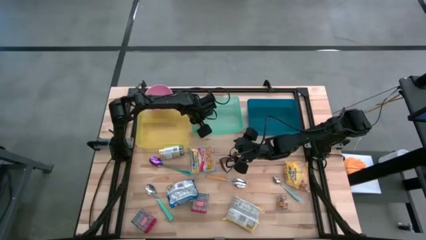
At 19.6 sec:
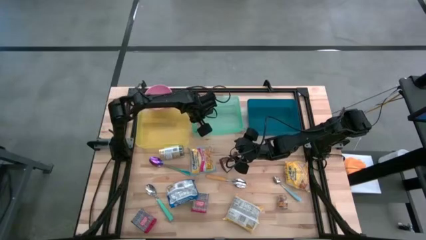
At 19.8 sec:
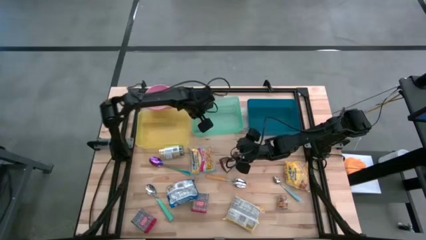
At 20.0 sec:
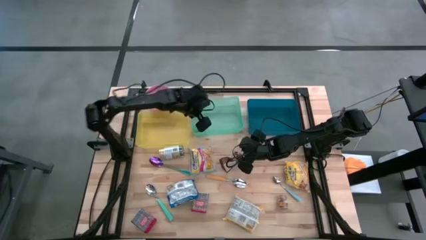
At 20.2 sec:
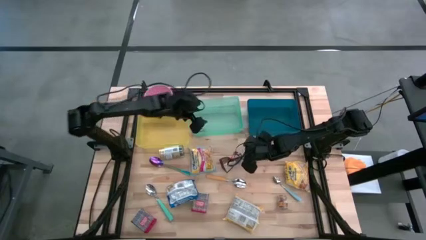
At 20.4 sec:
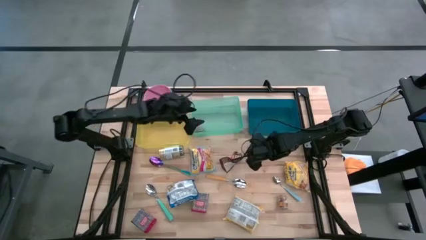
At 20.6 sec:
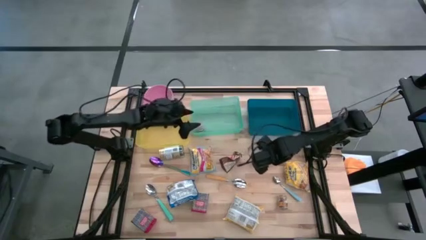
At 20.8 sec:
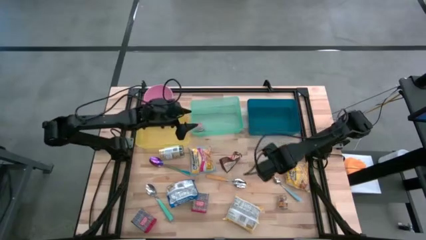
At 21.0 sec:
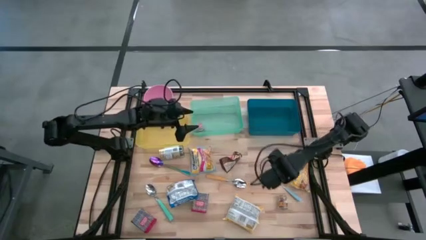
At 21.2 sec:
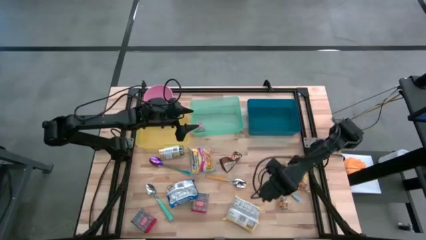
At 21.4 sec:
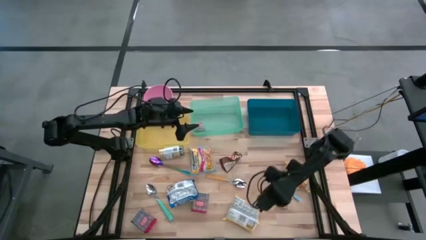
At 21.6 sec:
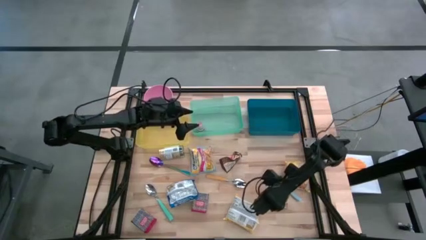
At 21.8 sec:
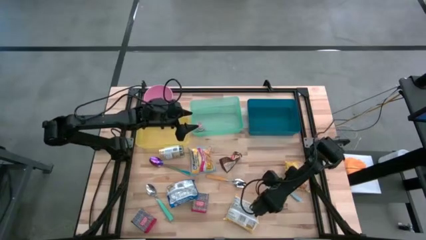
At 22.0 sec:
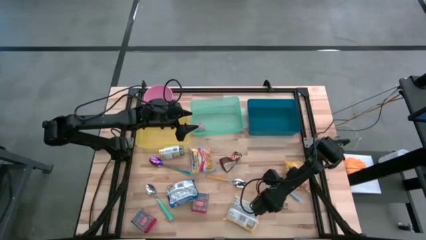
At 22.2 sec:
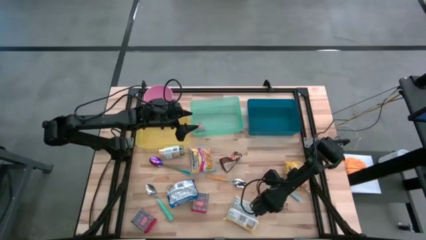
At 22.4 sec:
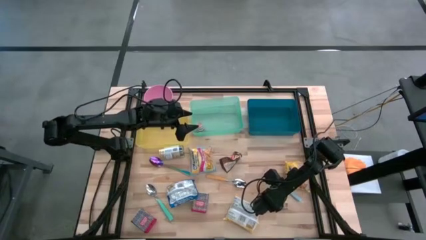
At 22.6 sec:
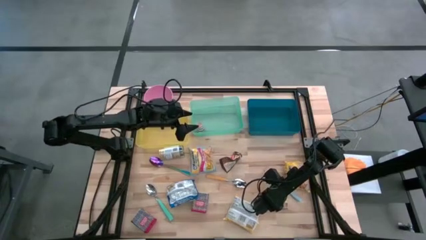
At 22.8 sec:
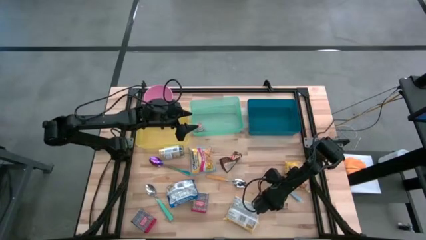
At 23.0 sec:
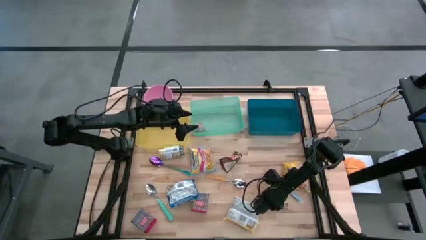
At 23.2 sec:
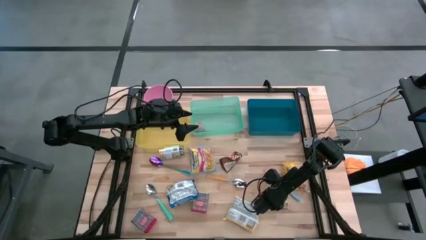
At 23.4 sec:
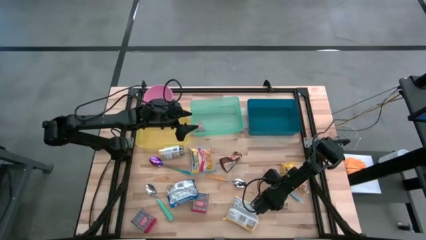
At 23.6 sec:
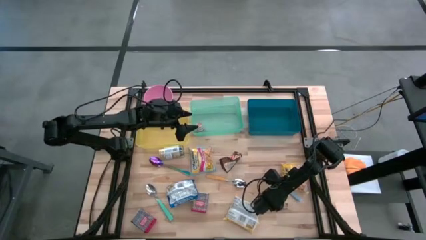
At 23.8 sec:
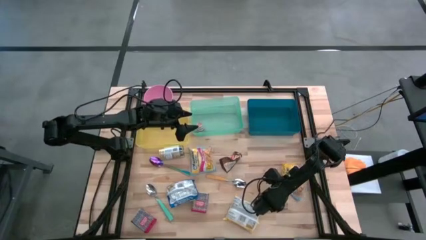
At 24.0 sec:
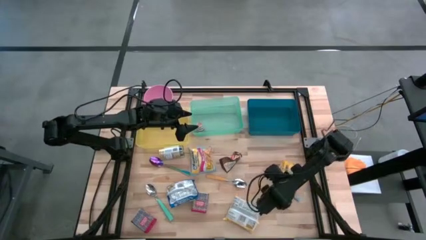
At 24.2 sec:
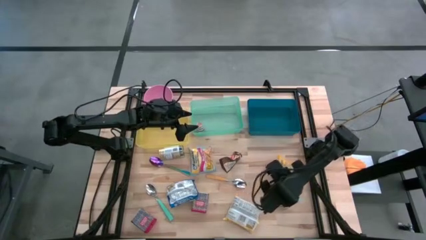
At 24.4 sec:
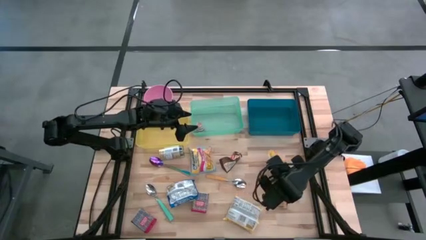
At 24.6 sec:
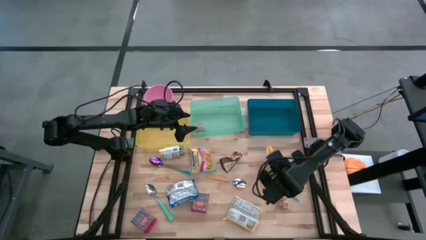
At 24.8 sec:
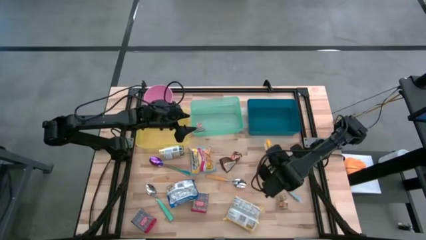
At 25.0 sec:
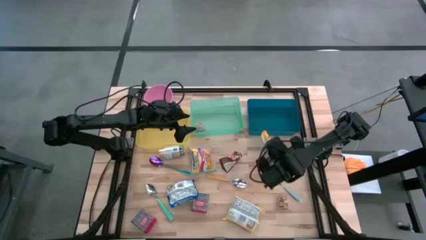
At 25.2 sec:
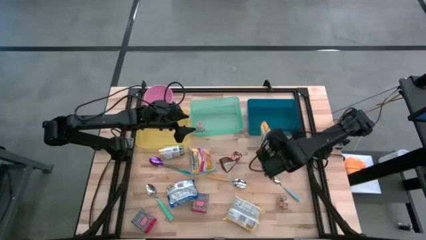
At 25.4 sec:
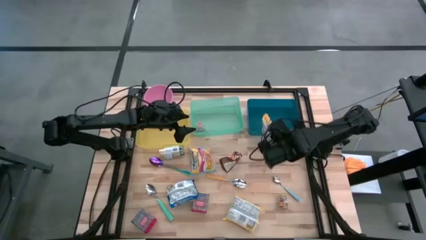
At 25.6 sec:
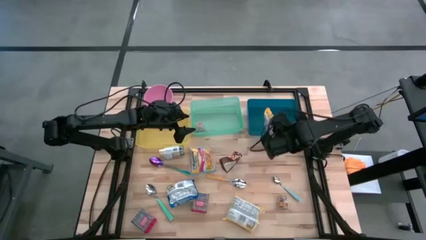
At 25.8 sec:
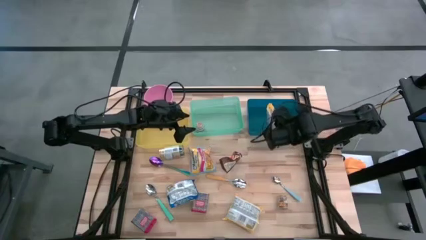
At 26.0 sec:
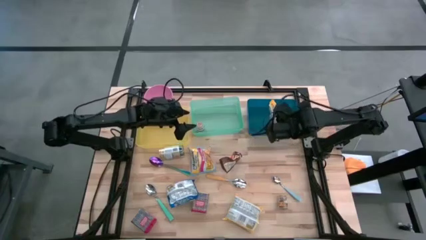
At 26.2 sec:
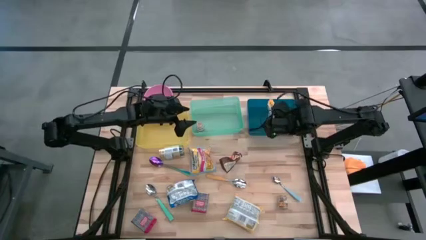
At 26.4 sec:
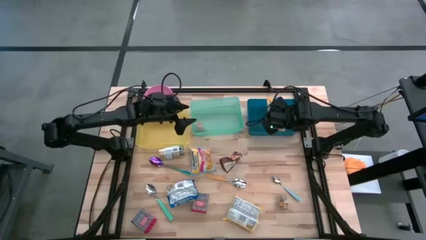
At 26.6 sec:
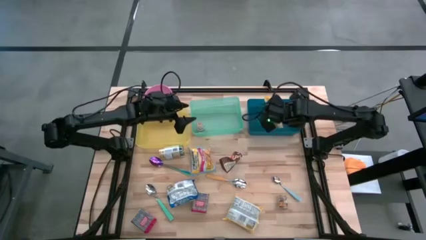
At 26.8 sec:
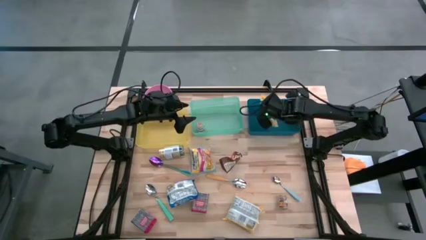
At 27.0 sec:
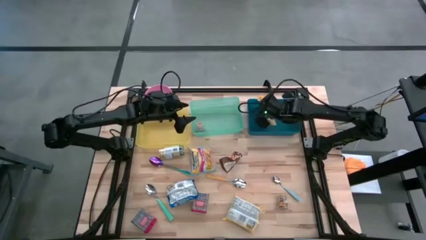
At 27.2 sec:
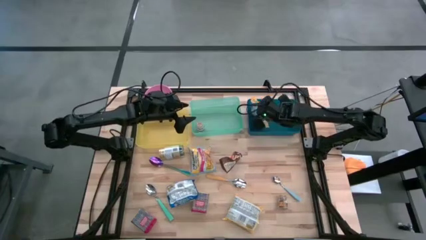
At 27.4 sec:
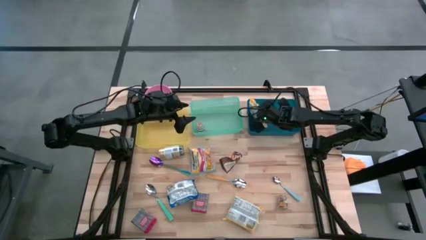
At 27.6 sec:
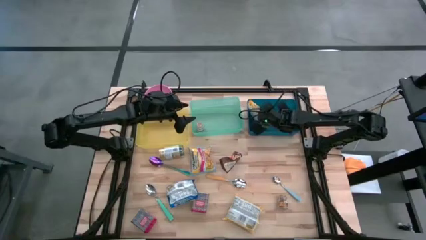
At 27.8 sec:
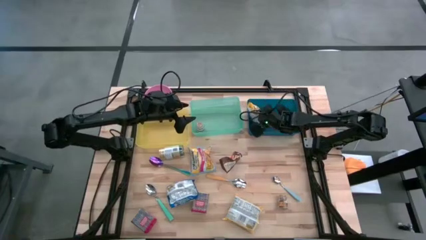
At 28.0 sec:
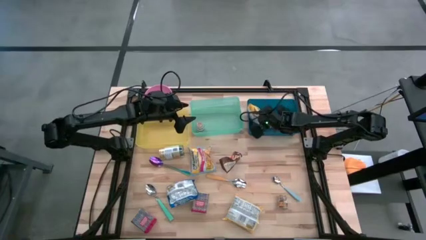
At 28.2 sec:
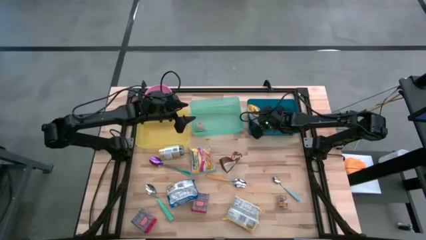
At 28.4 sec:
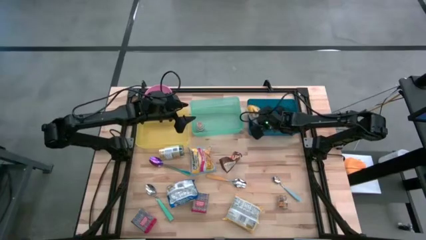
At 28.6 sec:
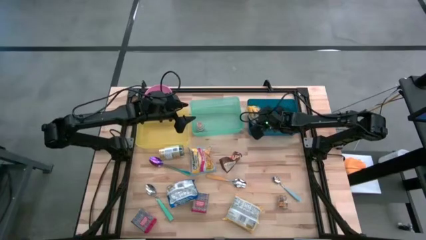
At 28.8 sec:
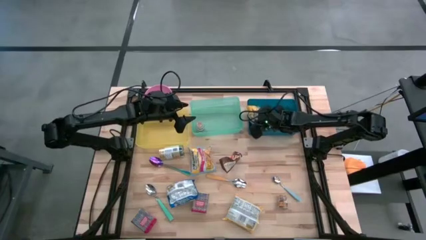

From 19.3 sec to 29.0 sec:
Put the top yellow noodle pack into the blue bin

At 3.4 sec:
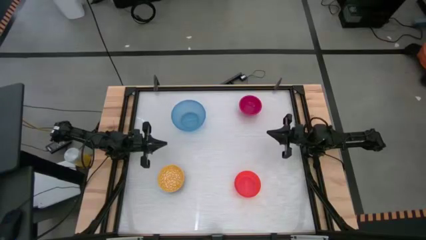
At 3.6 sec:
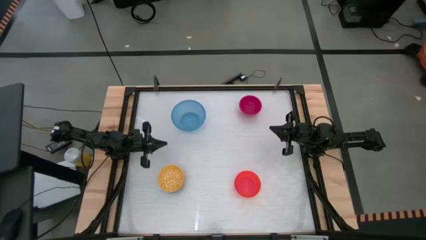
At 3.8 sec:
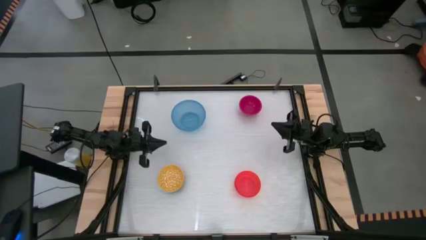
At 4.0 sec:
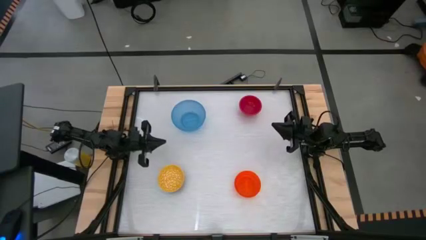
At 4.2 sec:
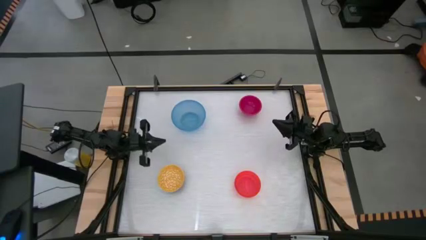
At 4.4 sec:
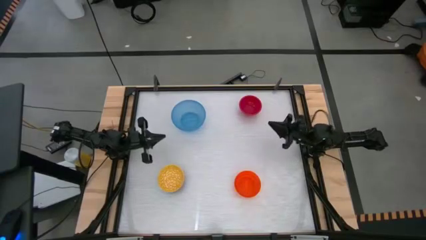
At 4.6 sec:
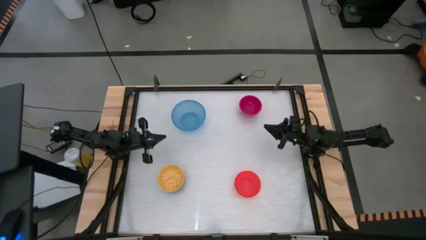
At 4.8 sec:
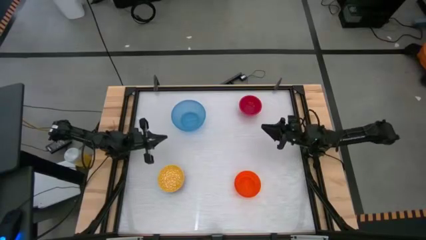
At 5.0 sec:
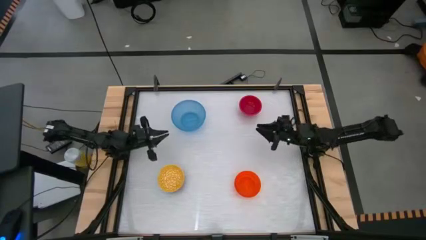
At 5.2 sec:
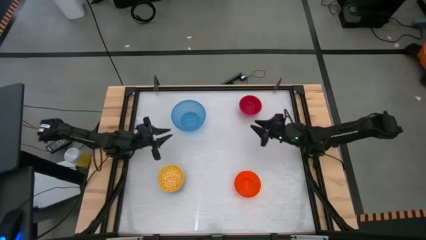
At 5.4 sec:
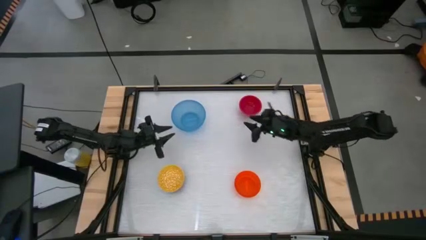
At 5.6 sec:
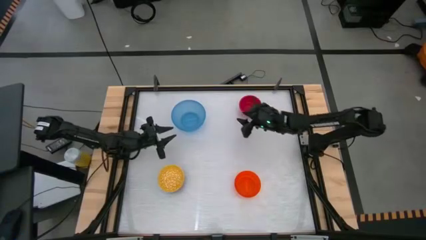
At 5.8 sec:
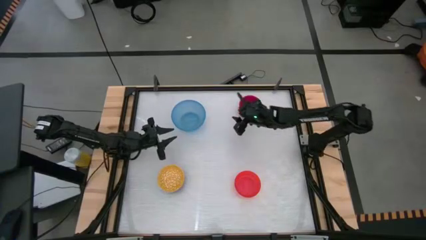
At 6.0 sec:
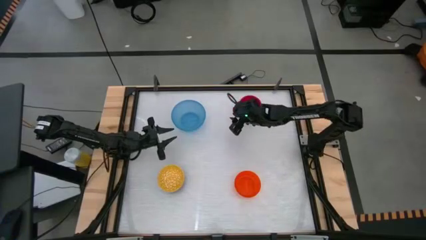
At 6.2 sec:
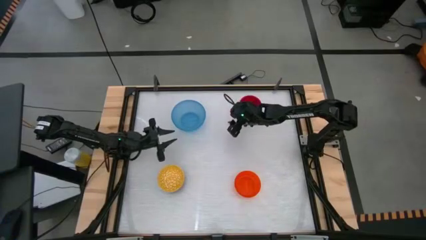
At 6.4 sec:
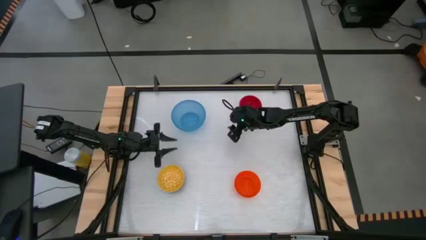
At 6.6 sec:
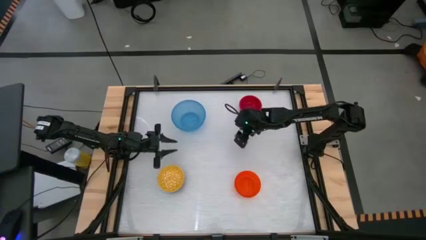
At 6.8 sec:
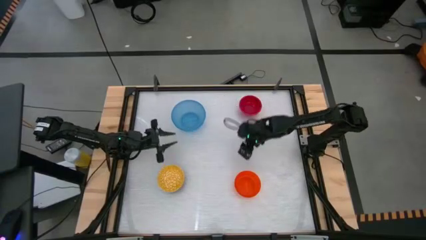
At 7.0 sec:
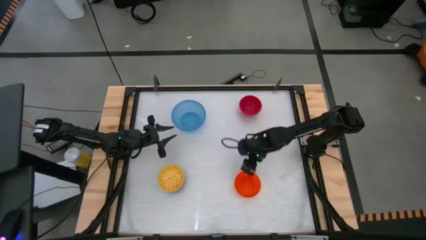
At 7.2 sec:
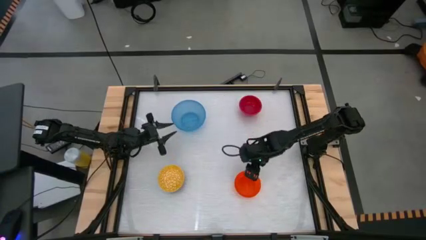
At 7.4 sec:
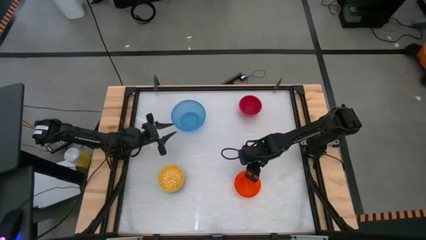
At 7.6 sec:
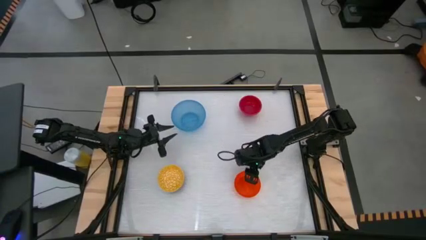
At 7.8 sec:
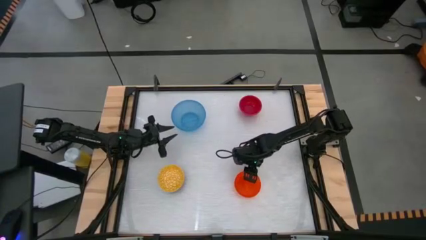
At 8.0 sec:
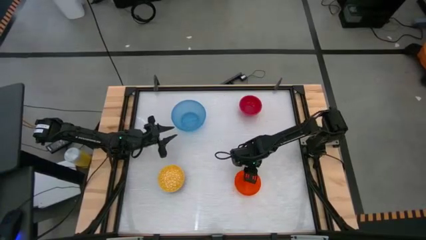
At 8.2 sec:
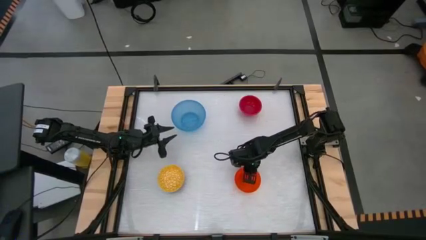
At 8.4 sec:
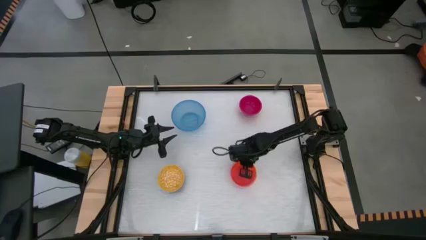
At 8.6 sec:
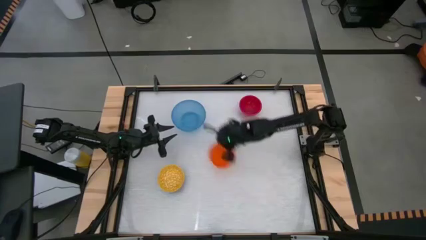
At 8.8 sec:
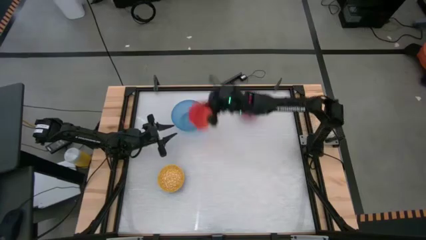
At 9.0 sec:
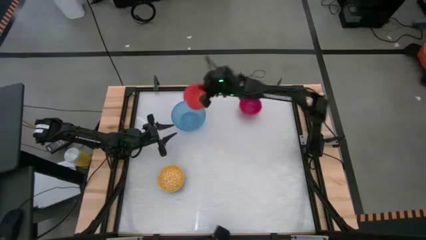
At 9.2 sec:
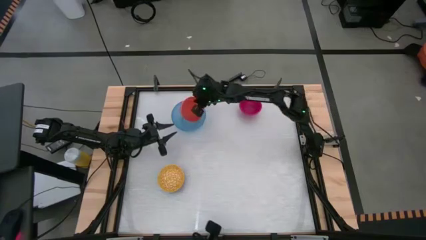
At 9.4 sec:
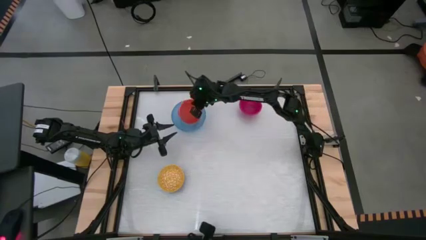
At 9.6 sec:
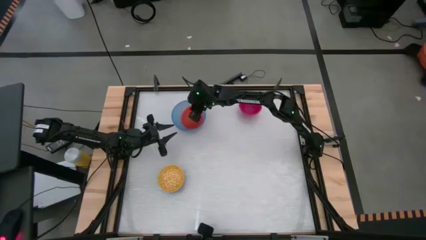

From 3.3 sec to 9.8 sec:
Stack the orange bowl onto the blue bowl

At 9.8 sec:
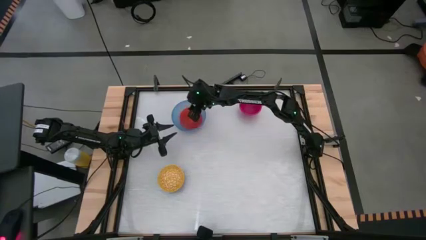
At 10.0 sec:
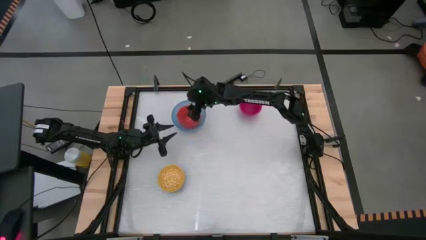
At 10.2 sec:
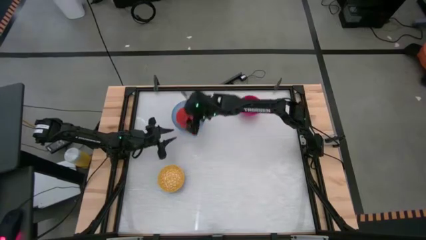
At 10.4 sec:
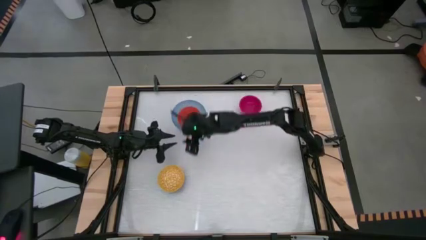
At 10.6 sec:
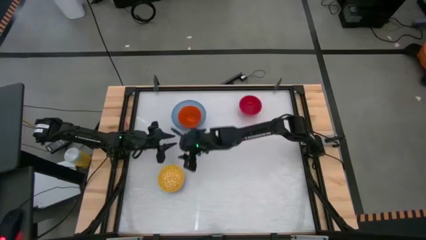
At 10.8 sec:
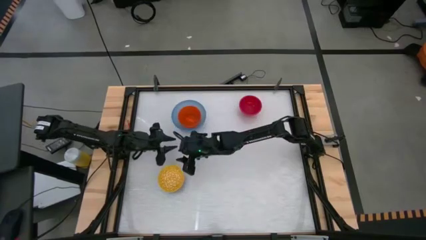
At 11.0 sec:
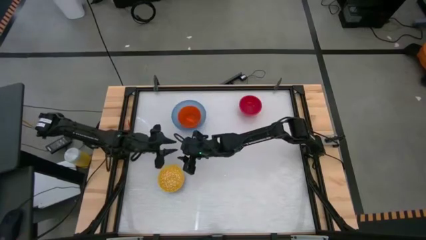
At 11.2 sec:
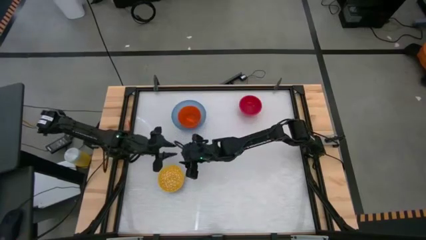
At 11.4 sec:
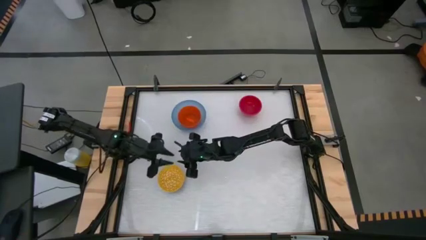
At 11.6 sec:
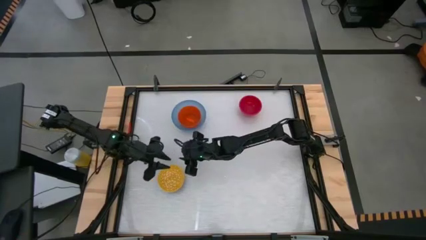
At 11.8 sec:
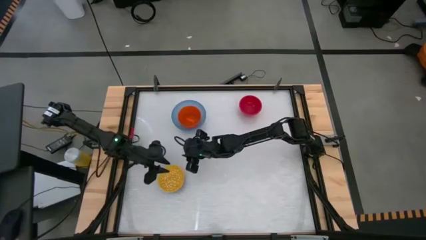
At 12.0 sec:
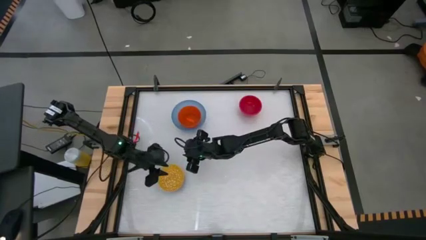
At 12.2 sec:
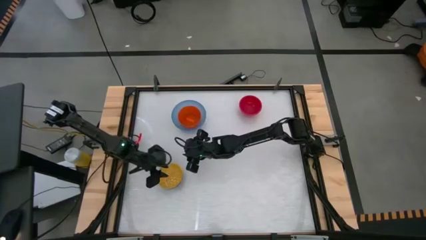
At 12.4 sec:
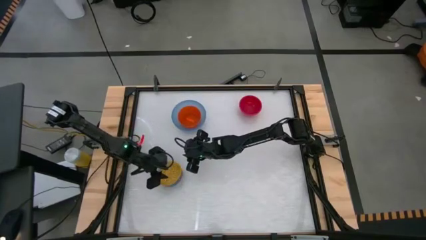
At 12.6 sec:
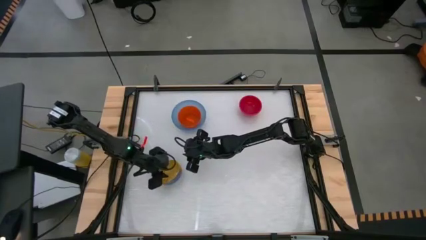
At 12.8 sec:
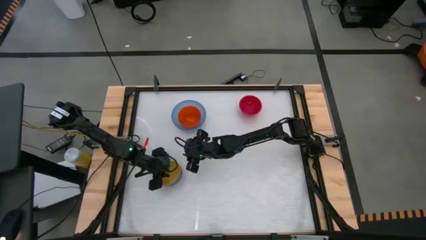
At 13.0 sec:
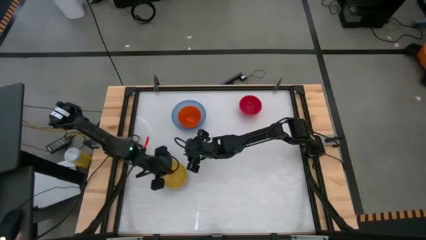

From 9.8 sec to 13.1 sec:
Stack the yellow bowl onto the orange bowl
